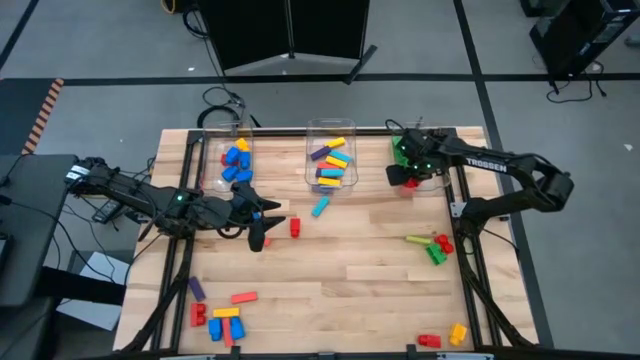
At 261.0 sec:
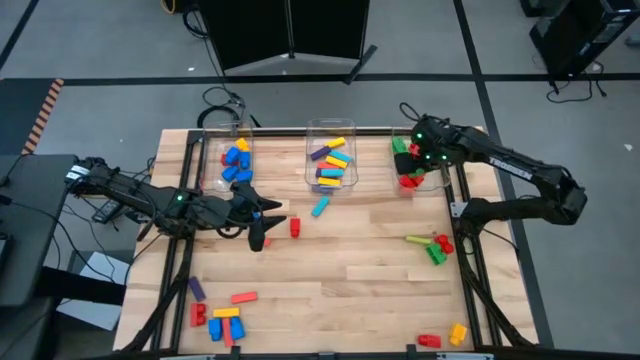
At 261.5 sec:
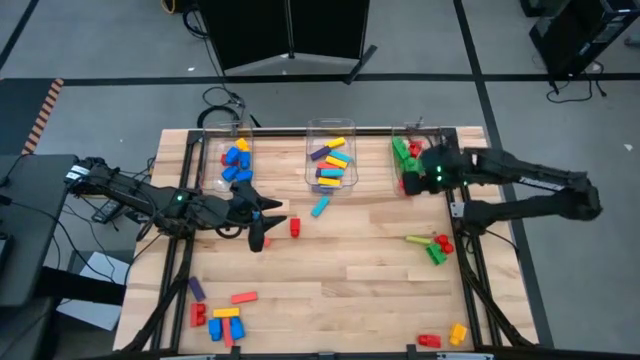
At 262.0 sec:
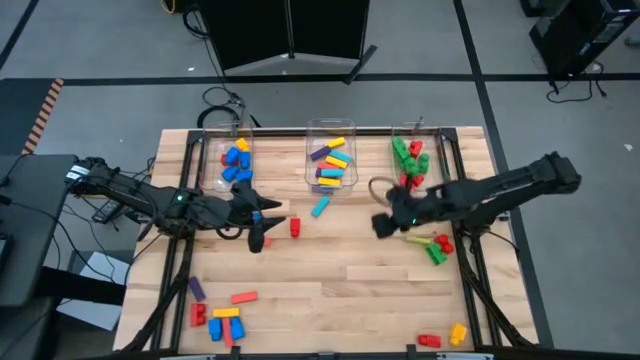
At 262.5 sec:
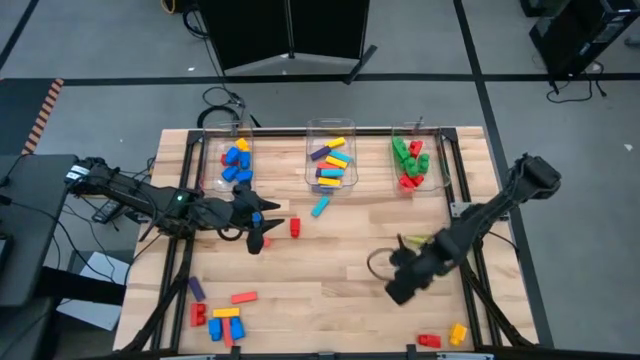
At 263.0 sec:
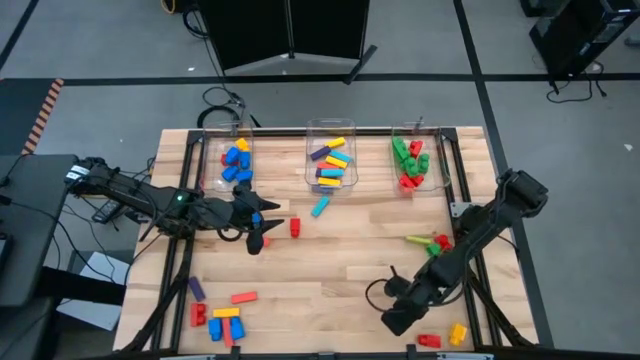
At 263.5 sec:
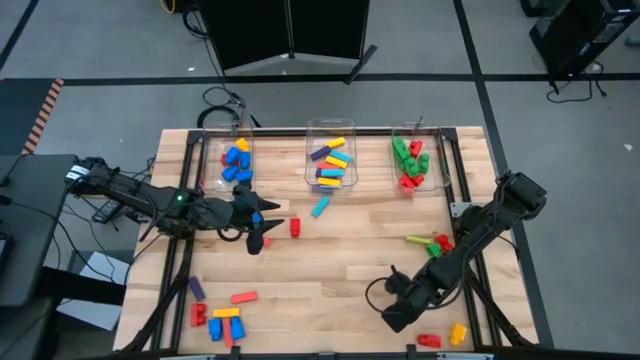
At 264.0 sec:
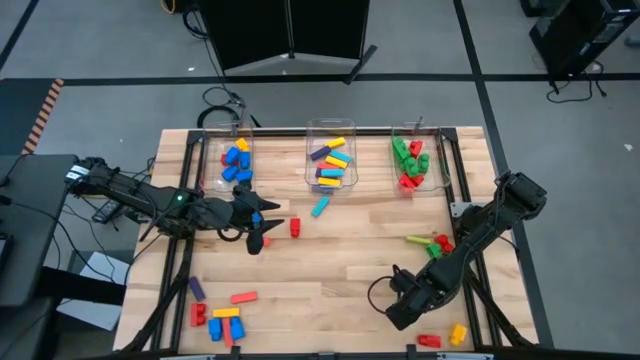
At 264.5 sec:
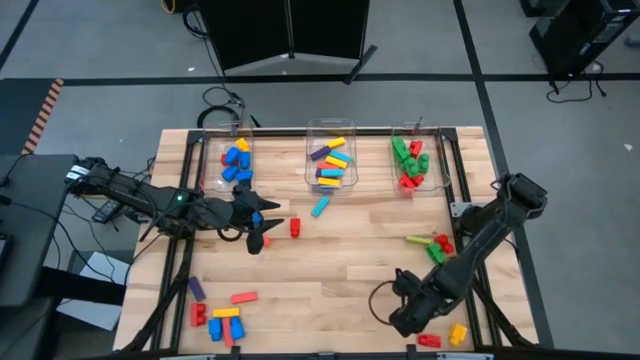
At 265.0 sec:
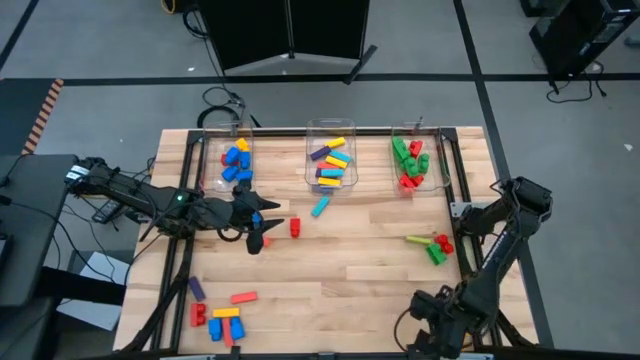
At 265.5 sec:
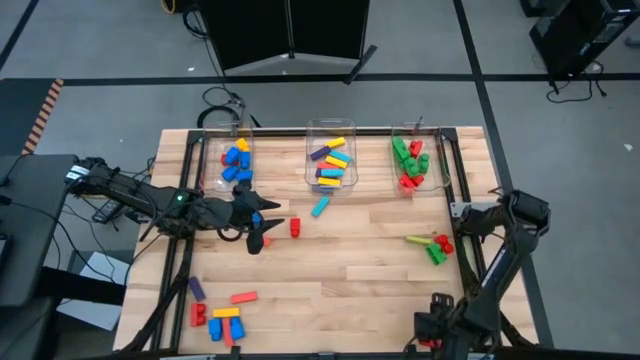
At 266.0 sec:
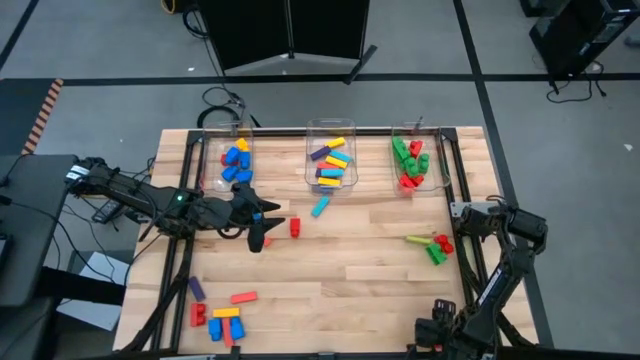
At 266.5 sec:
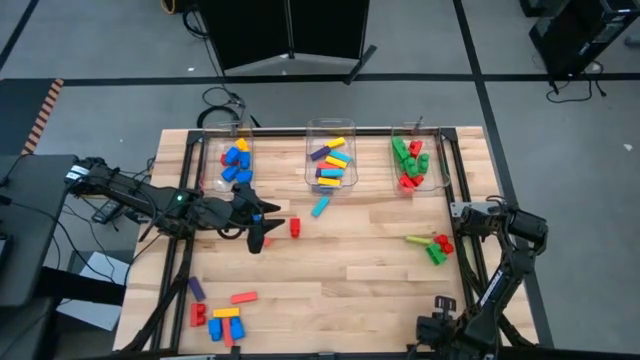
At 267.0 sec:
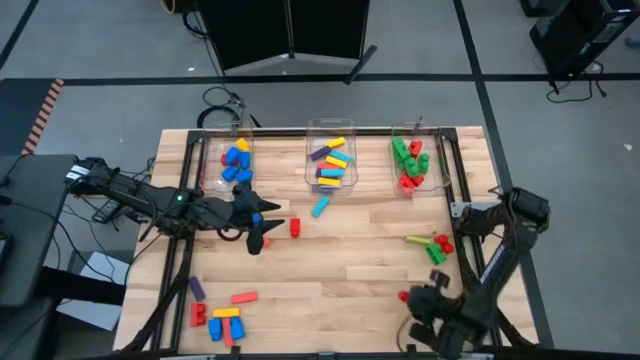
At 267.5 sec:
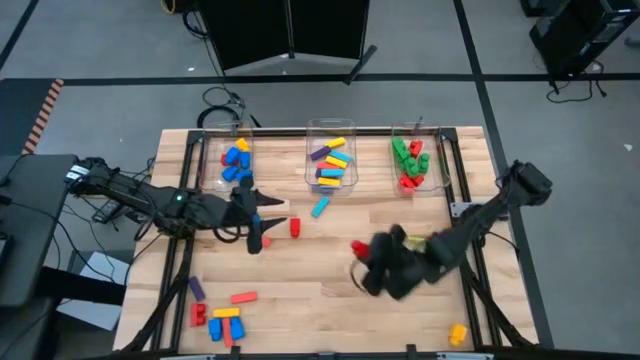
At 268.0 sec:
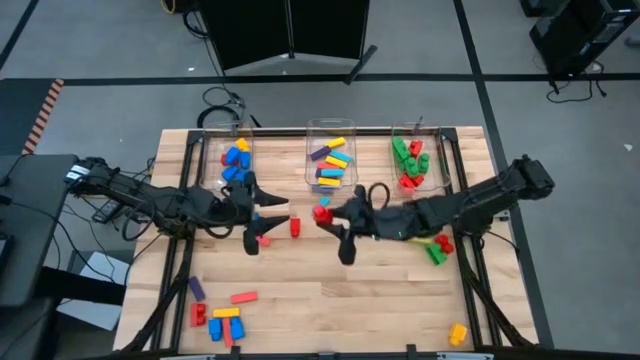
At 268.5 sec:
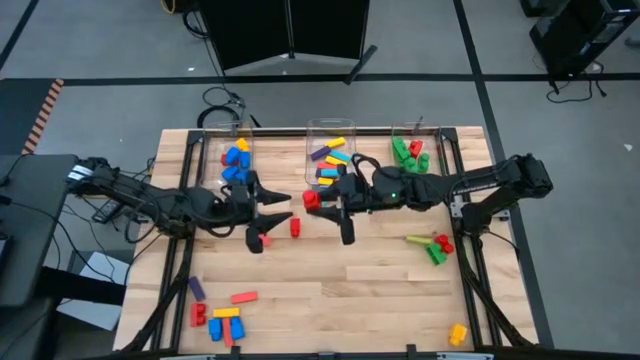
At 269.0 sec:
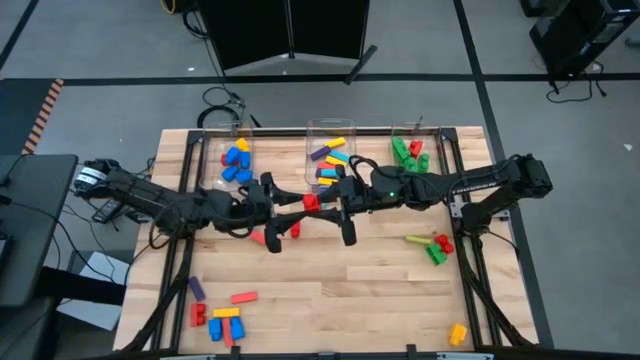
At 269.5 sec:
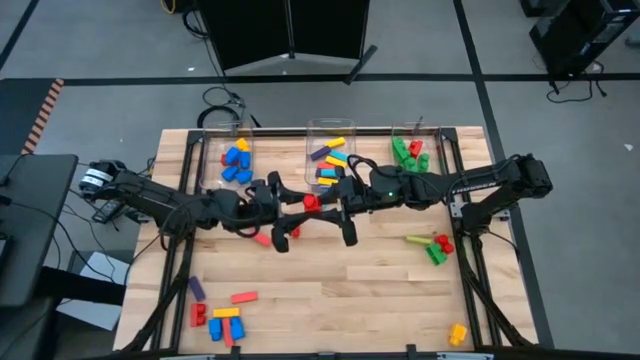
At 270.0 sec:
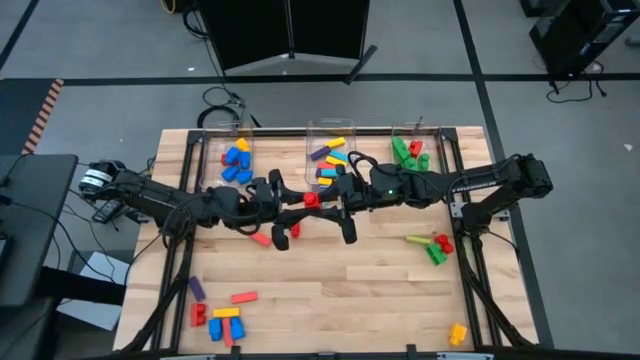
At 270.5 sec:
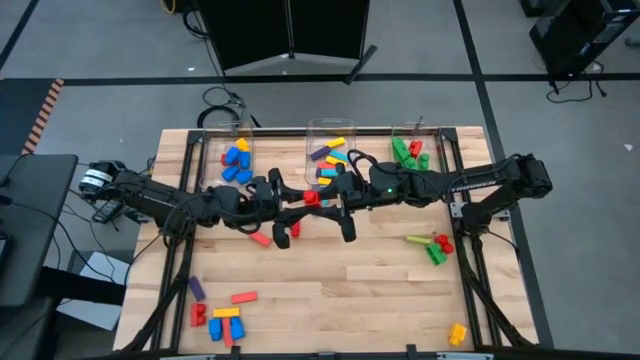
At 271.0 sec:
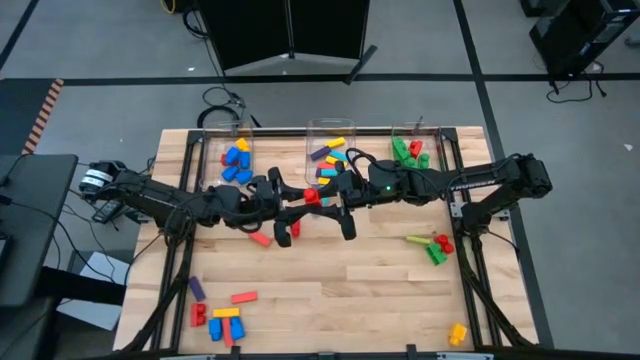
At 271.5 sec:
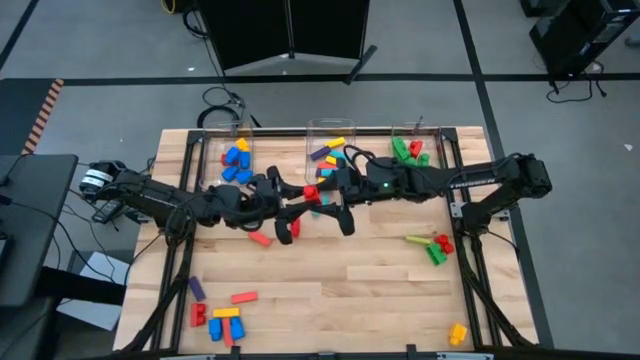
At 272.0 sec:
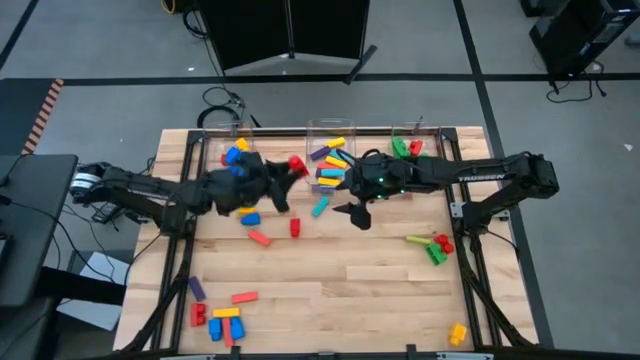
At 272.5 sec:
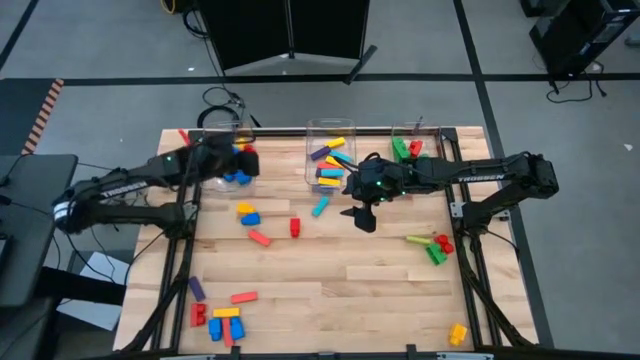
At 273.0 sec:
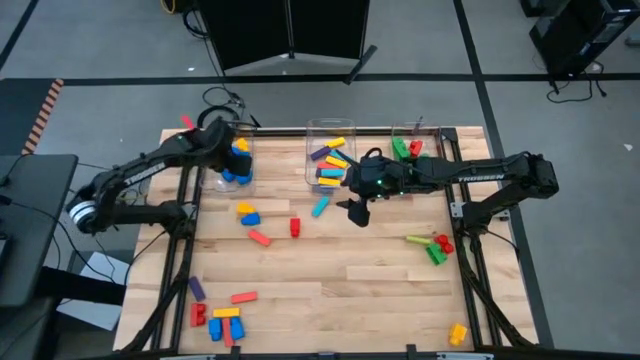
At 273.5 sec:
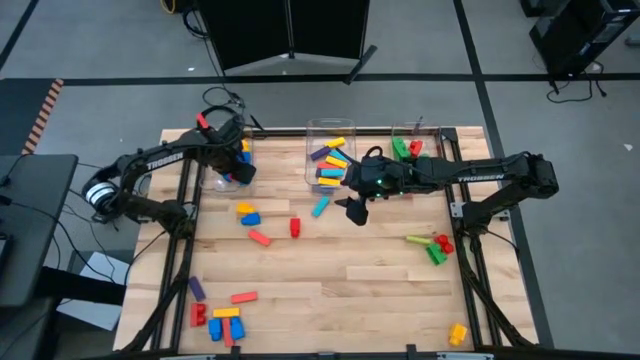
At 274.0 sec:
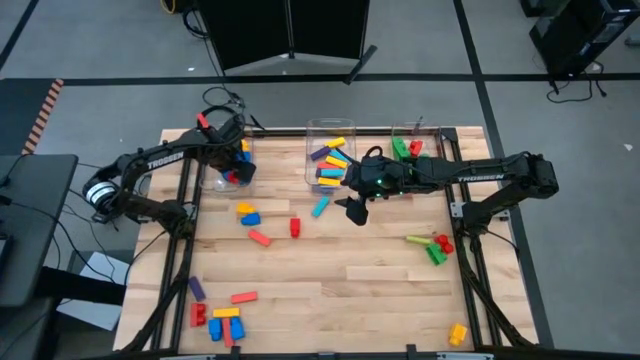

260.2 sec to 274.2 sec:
Task: Sort blocks by size
Put the red 1 stud game piece into the left transparent bin

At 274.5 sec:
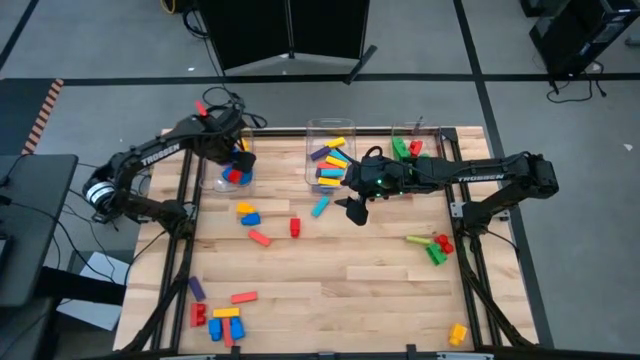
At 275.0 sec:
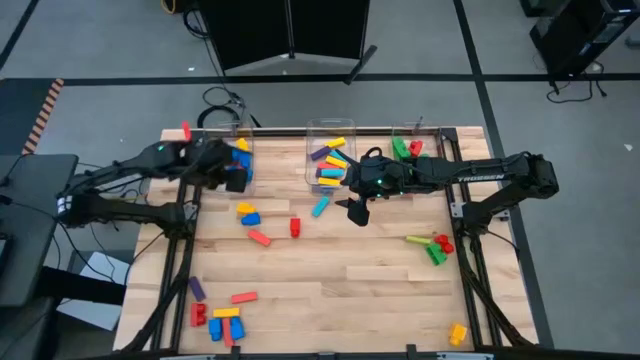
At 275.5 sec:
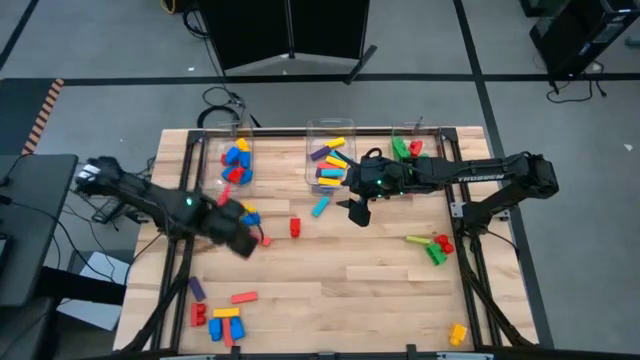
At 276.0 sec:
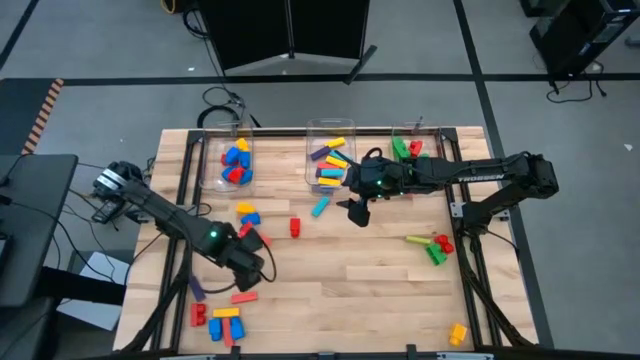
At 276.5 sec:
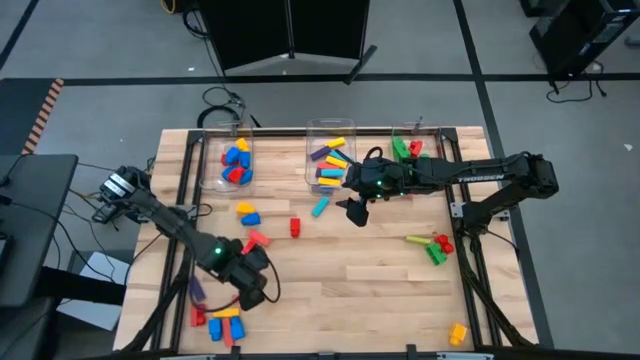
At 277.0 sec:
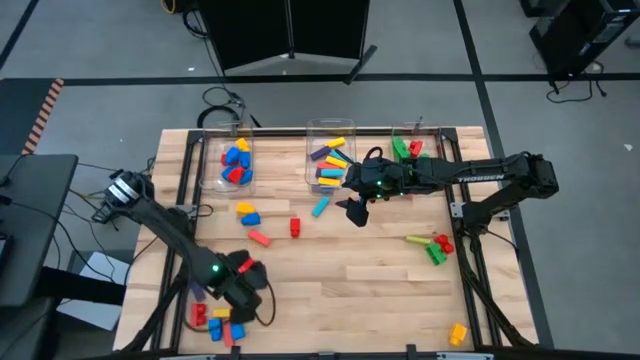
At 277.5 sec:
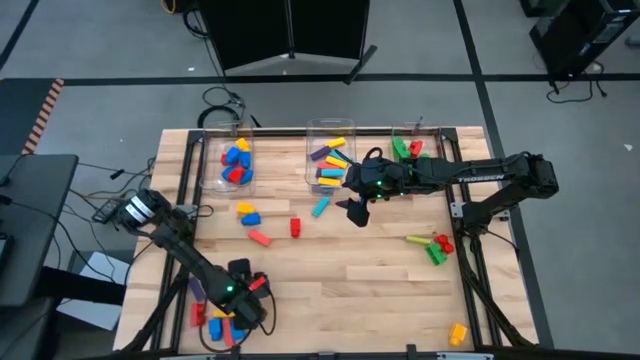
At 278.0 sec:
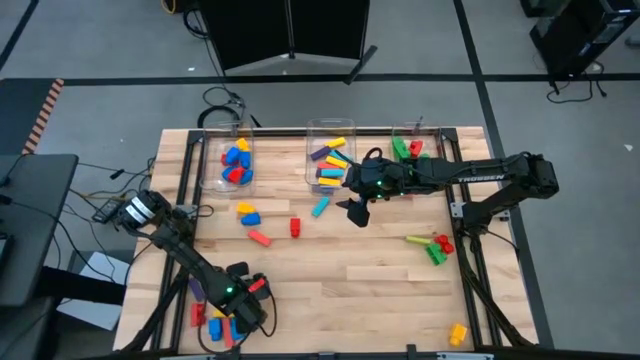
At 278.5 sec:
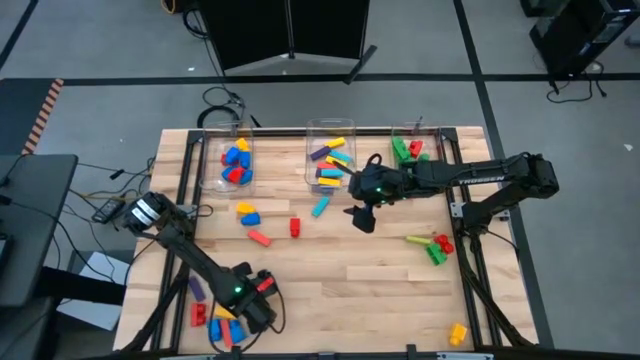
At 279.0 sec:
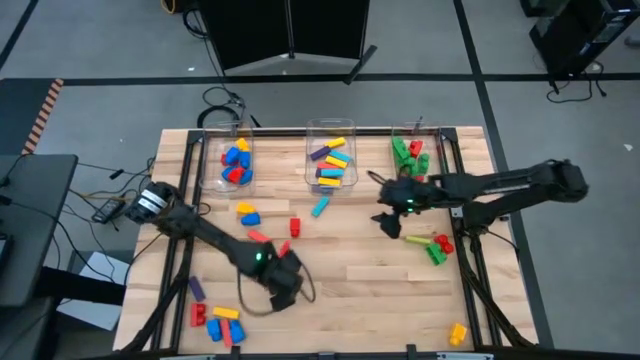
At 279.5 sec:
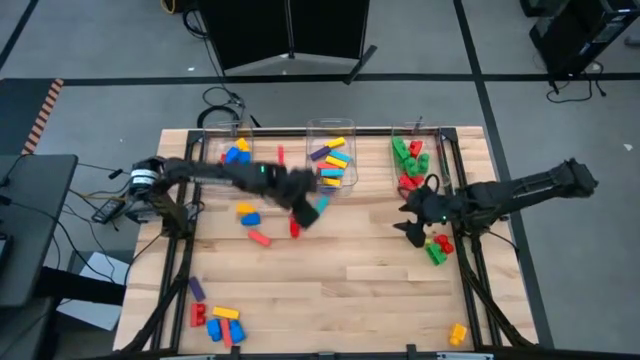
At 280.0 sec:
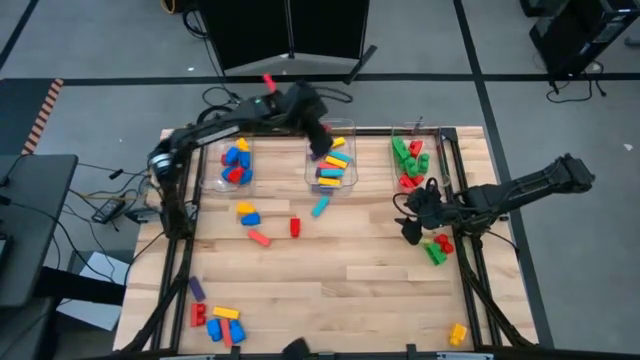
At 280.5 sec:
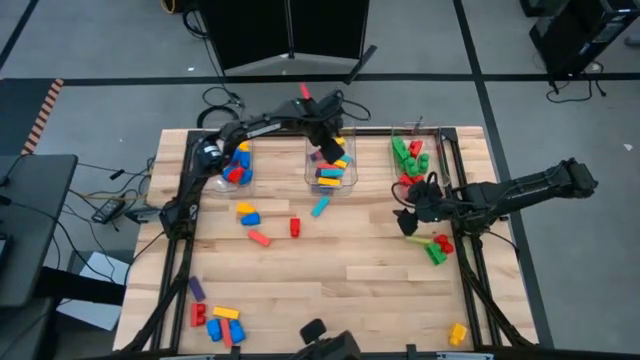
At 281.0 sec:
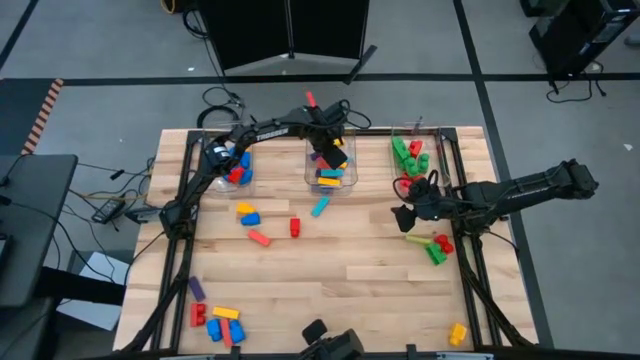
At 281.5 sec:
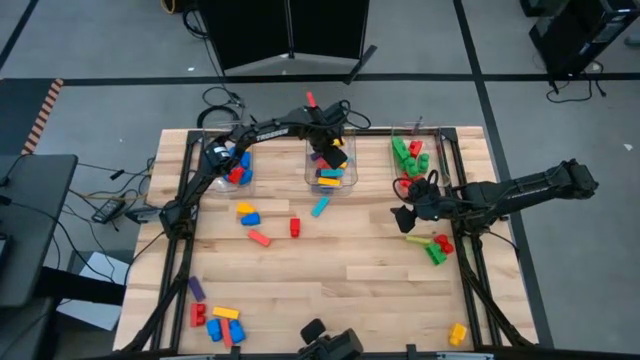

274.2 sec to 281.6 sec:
Put the red block into the middle transparent bin
